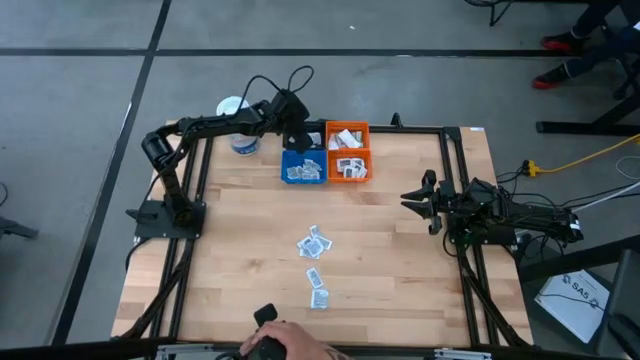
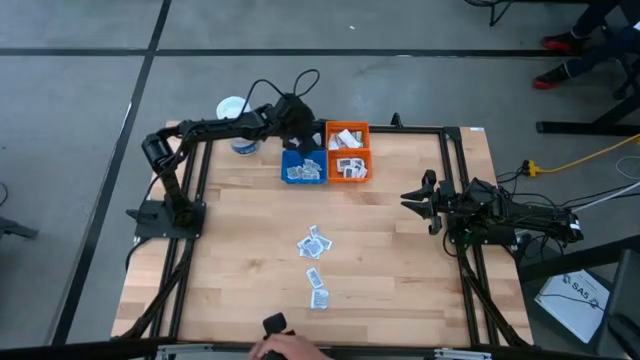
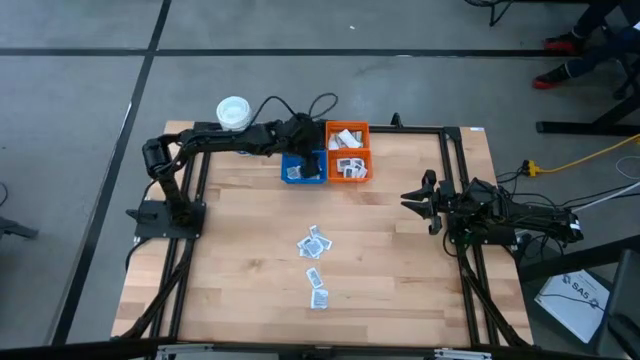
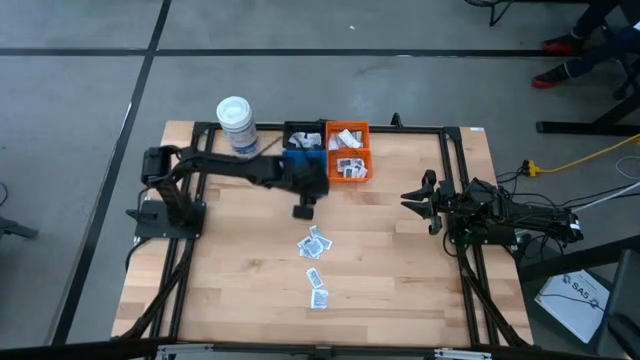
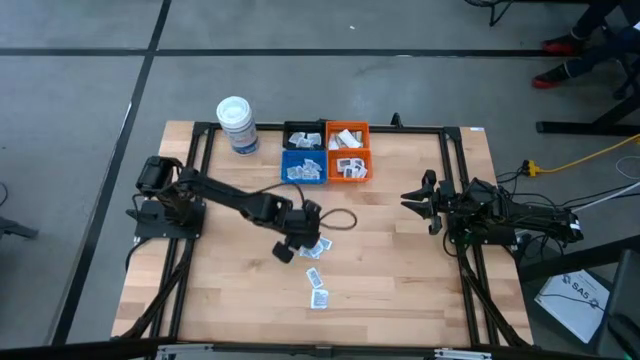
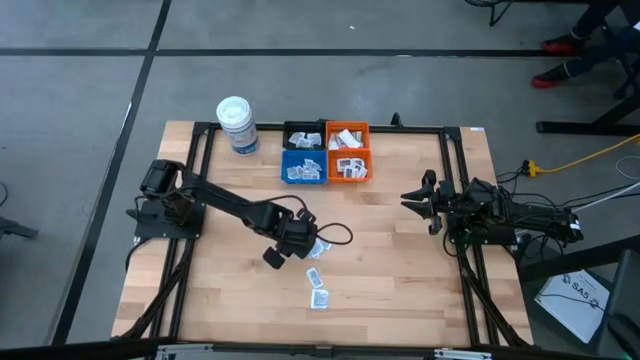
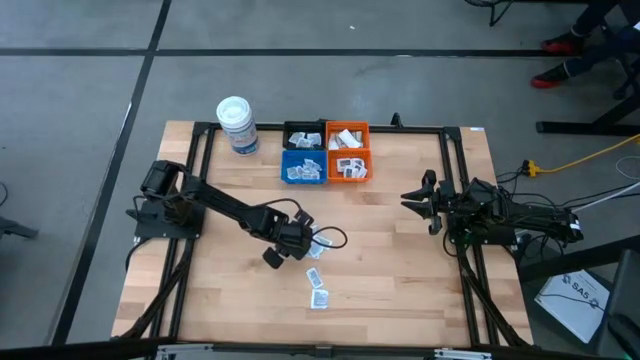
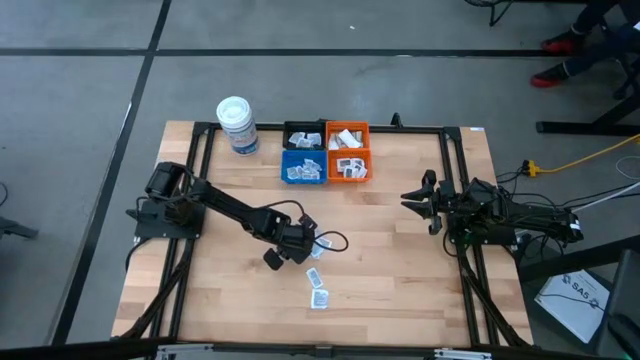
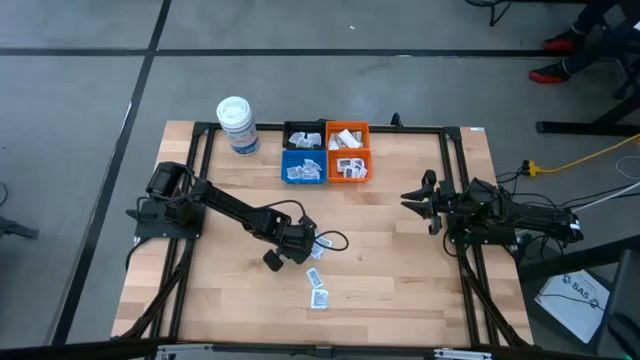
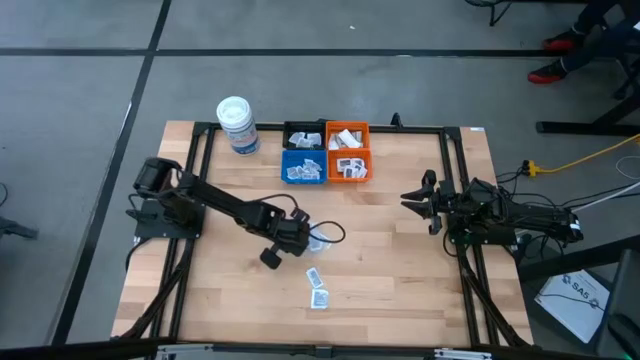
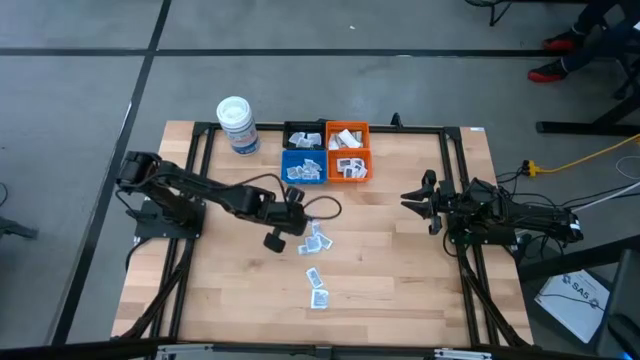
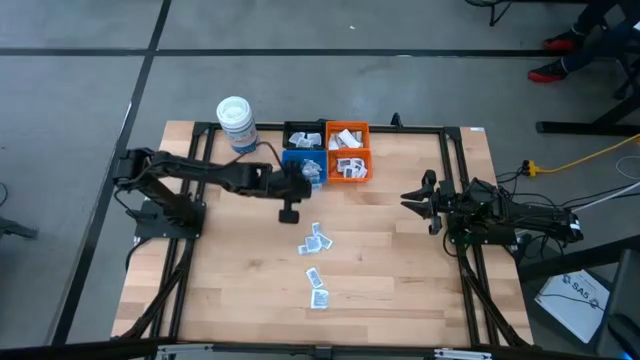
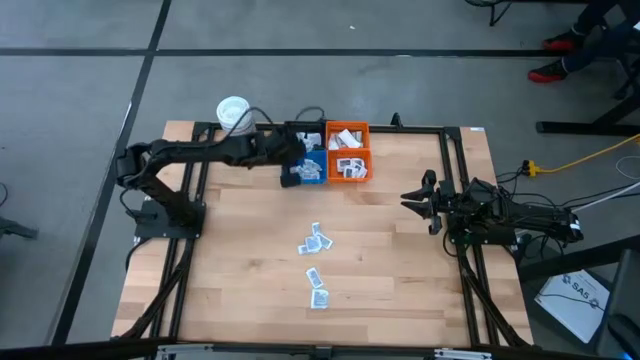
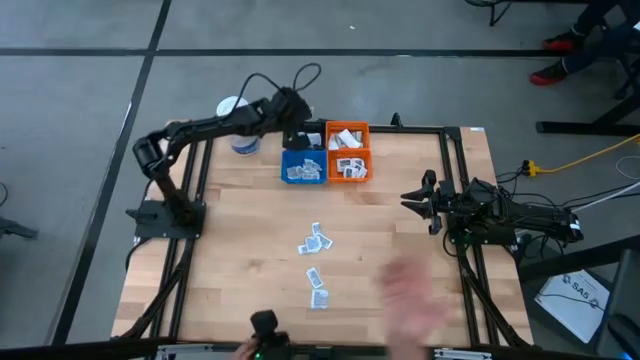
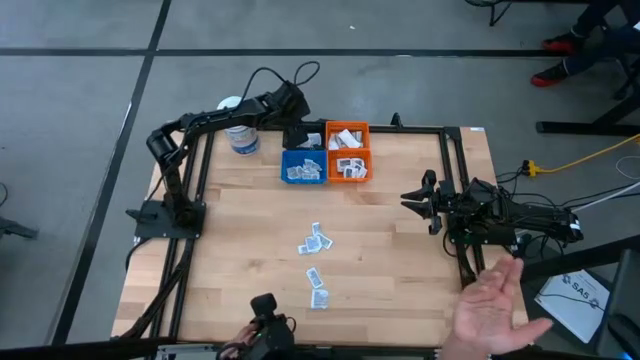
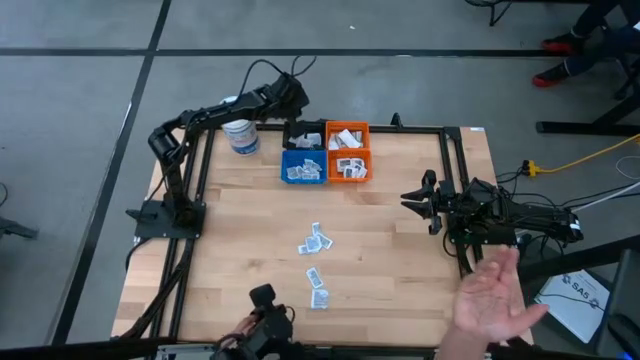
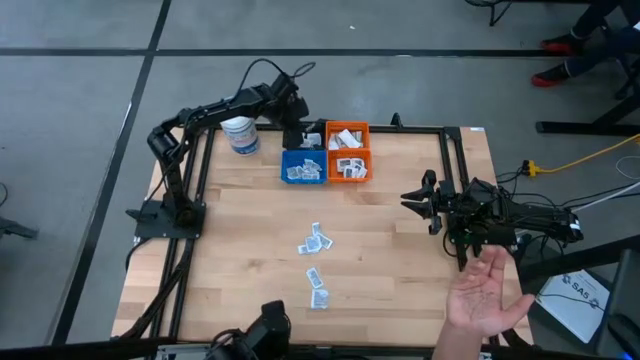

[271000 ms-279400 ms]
Task: Pick & Place First Aid Supplies
Put the alcohol pad into the black bin

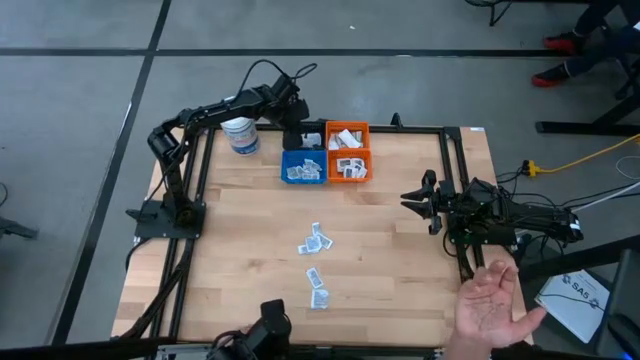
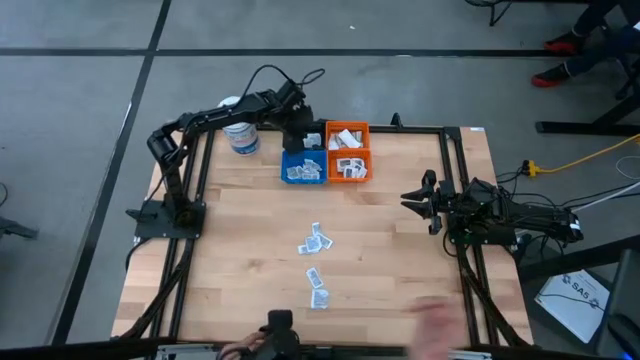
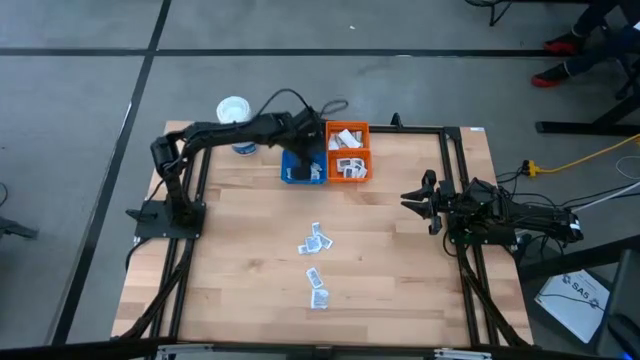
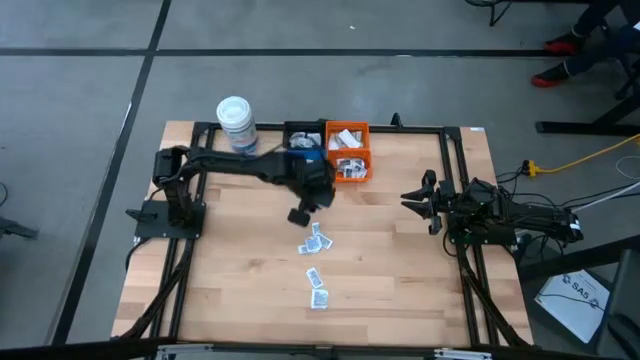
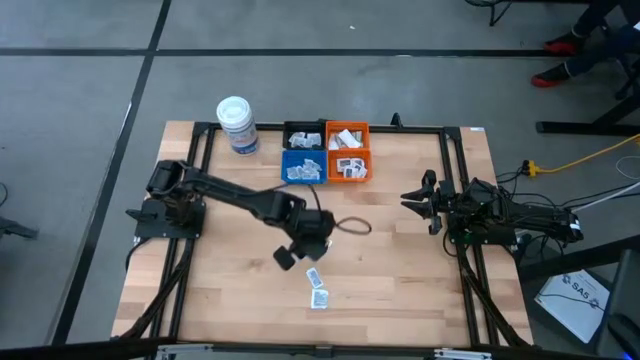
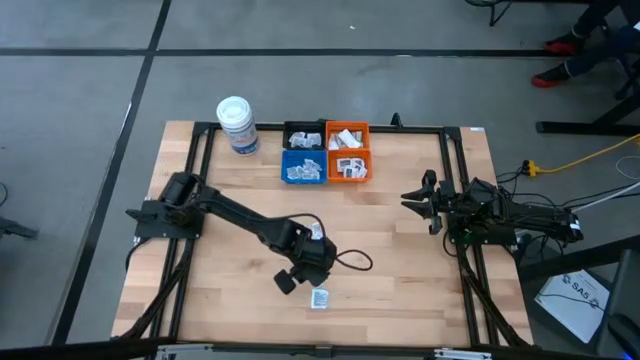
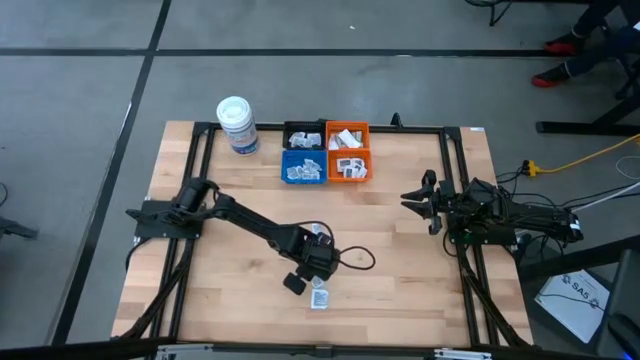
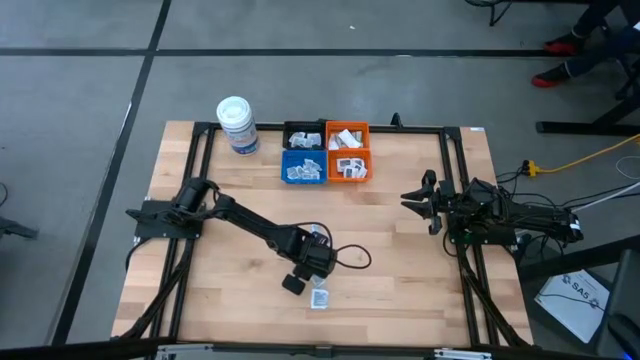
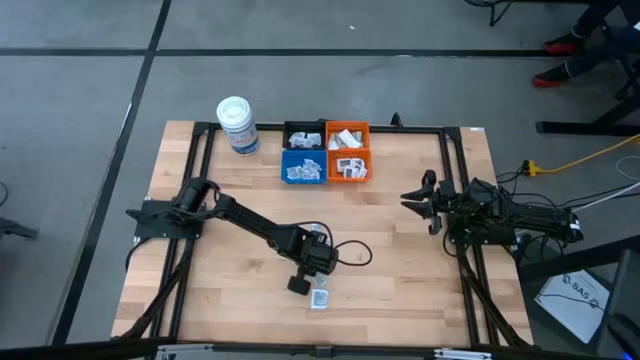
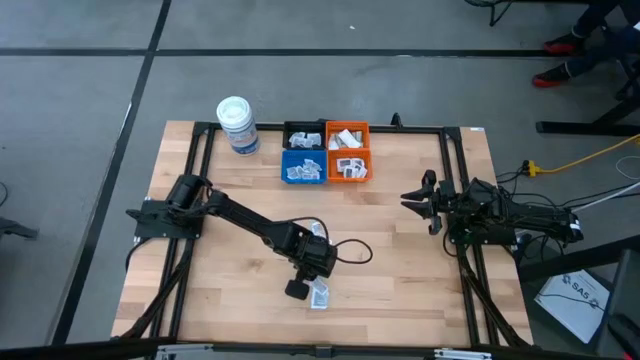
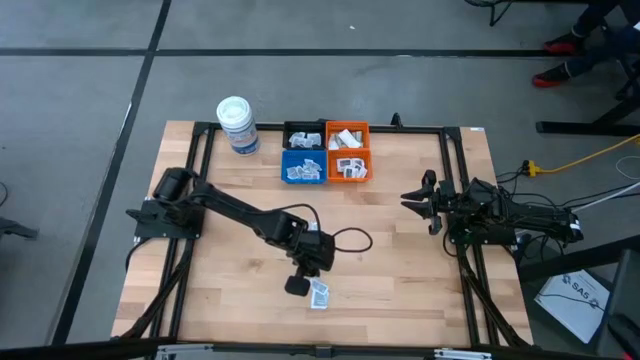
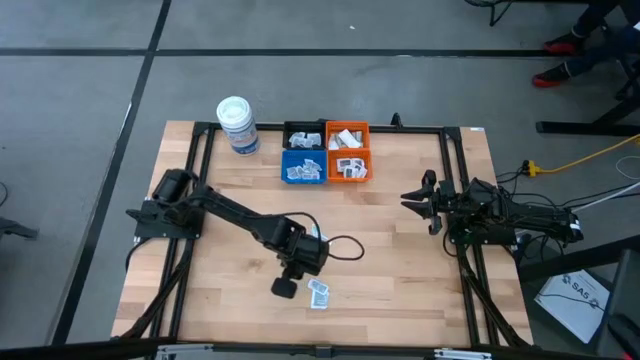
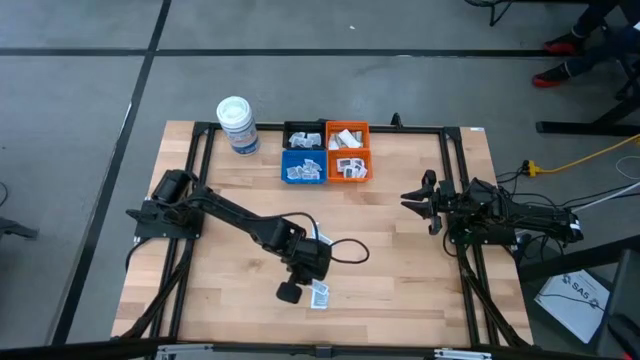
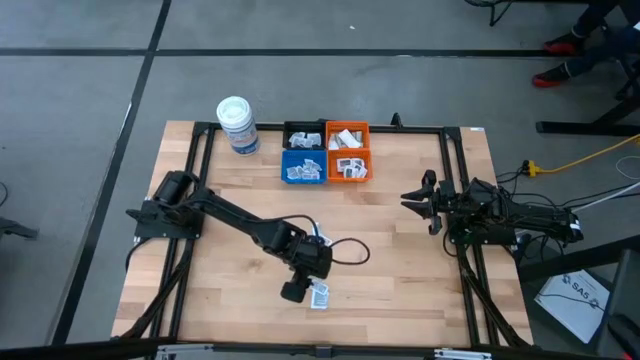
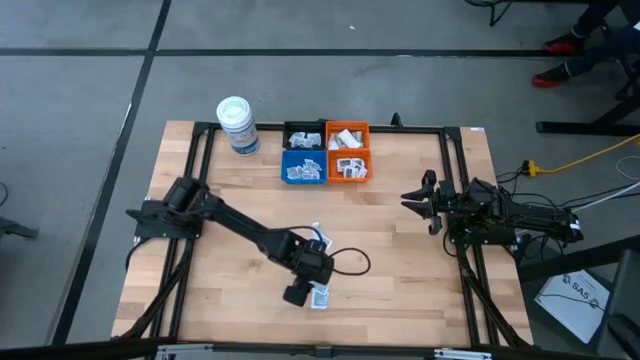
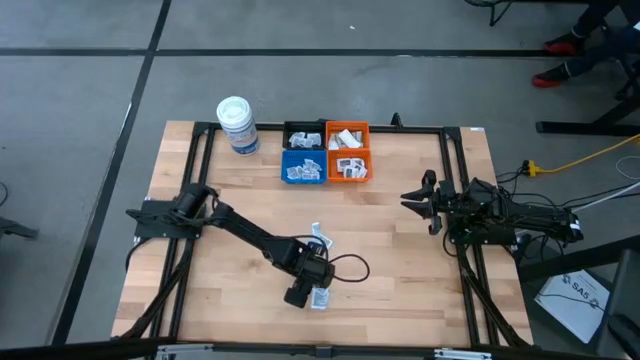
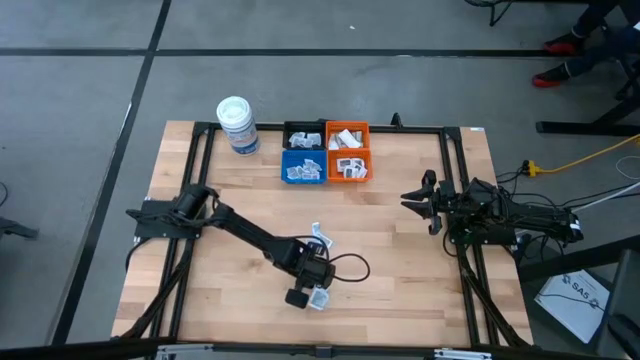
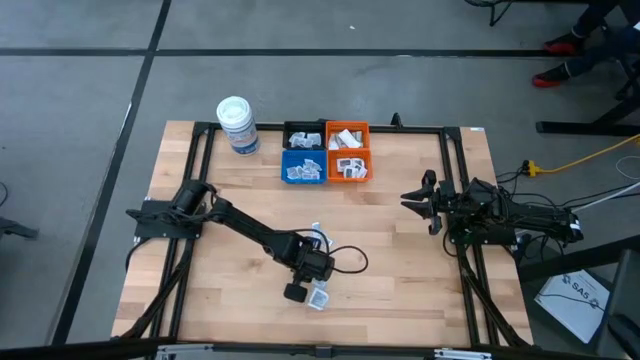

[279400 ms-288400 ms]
Put the ointment pack into the blue bin

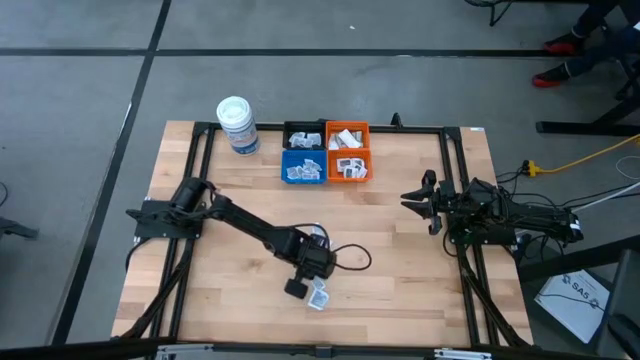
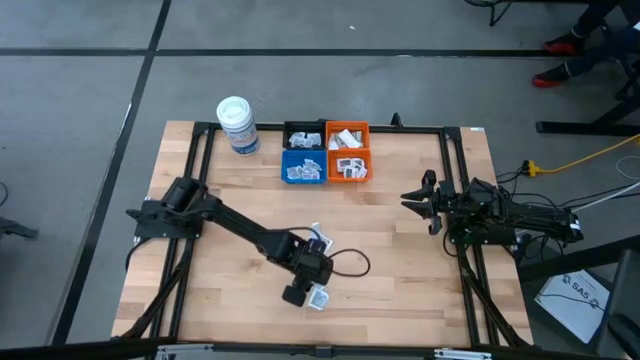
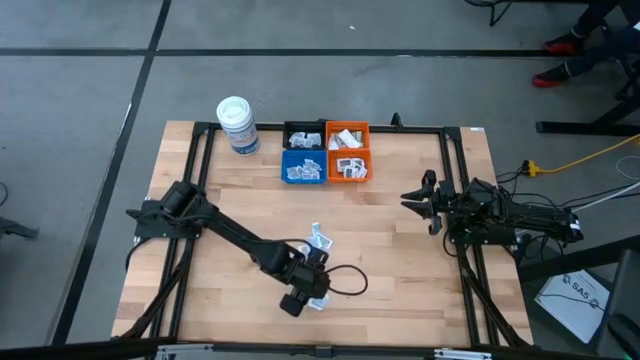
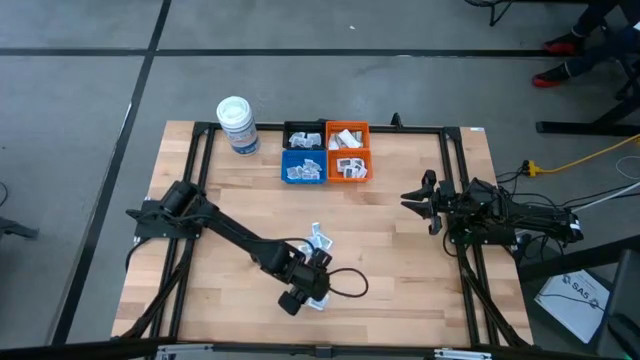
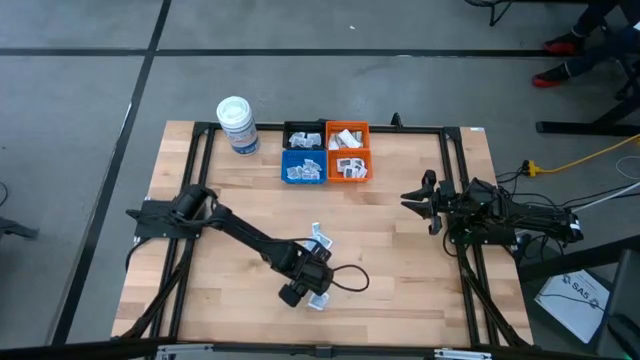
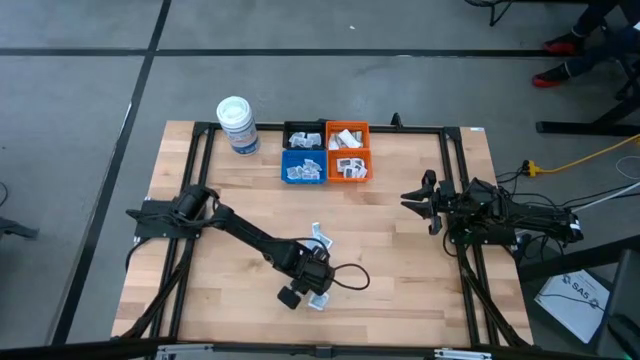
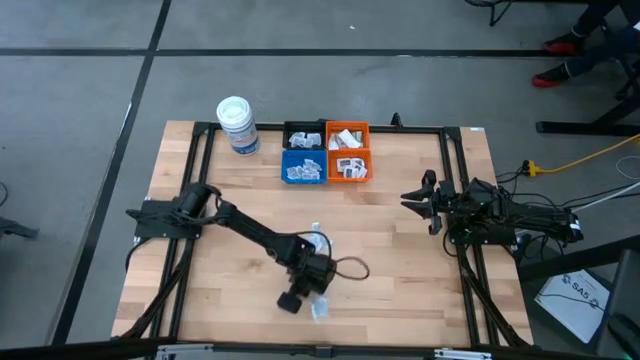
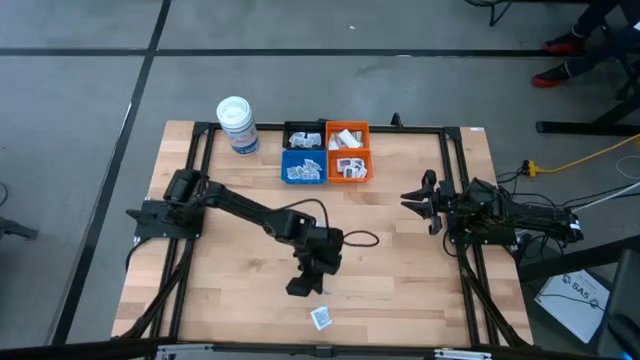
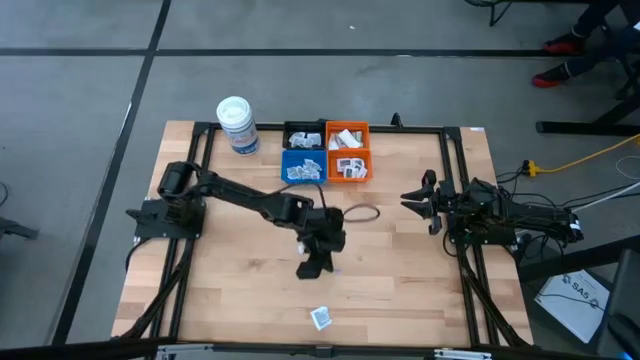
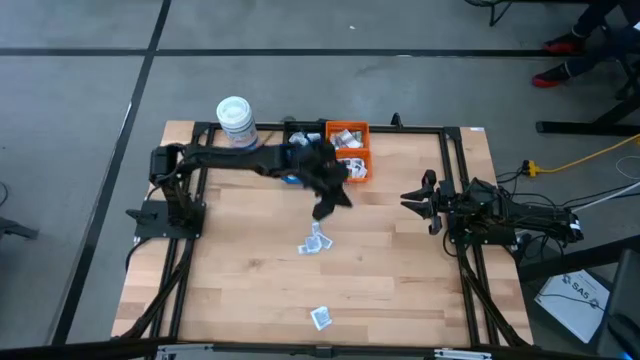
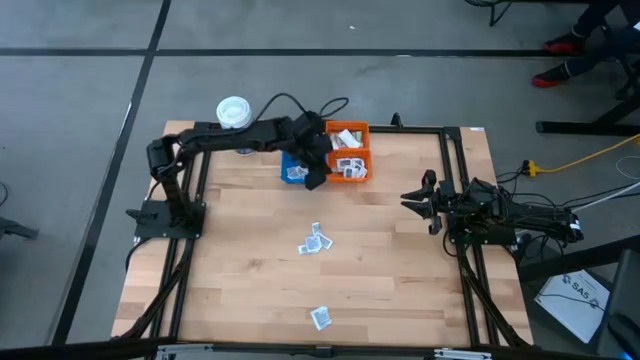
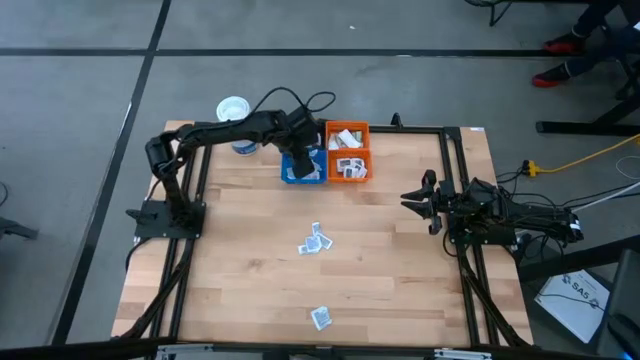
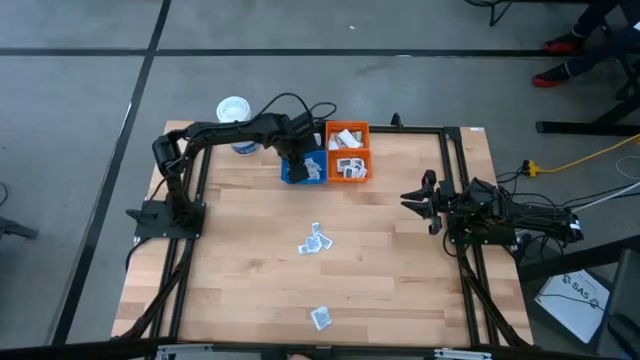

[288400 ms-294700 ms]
Put the ointment pack into the blue bin
